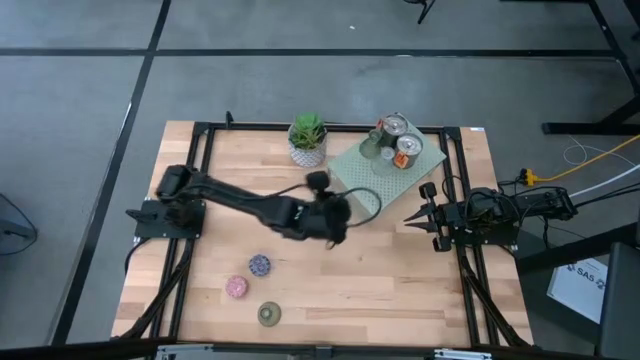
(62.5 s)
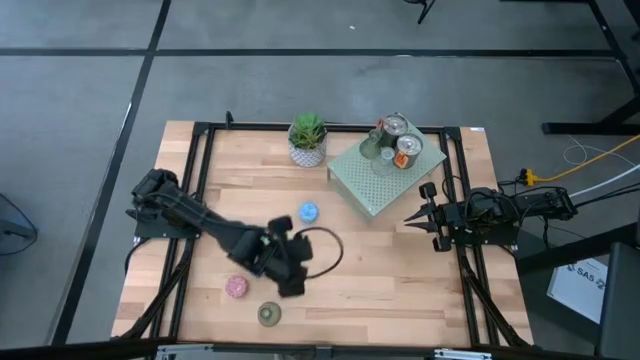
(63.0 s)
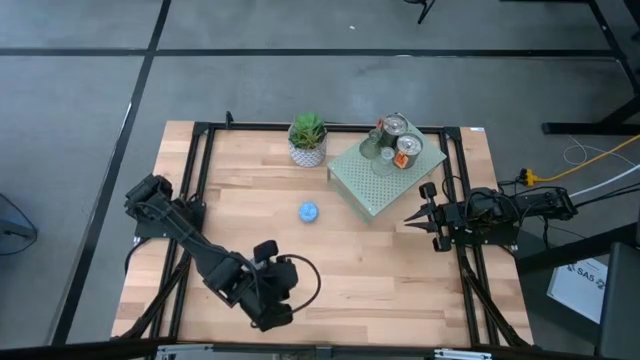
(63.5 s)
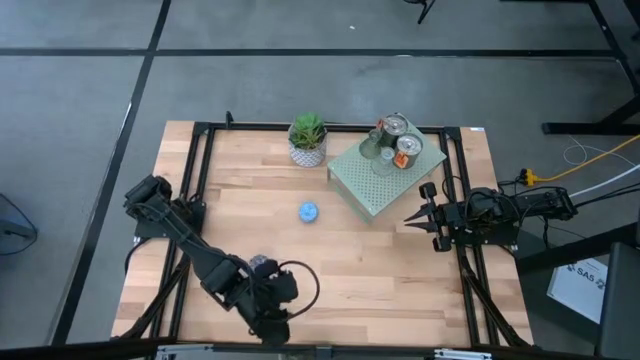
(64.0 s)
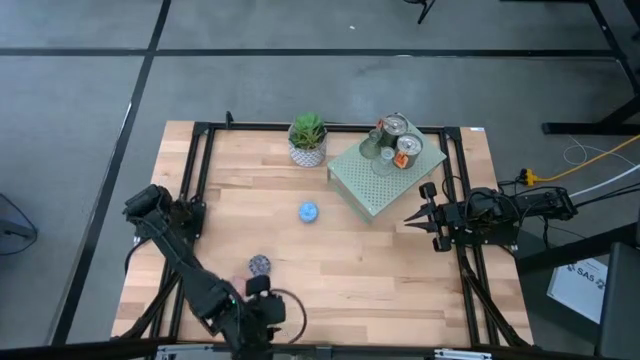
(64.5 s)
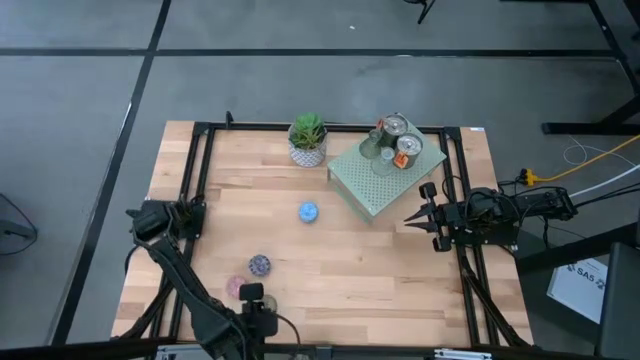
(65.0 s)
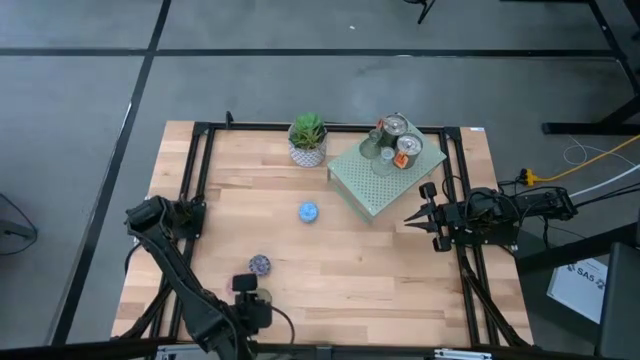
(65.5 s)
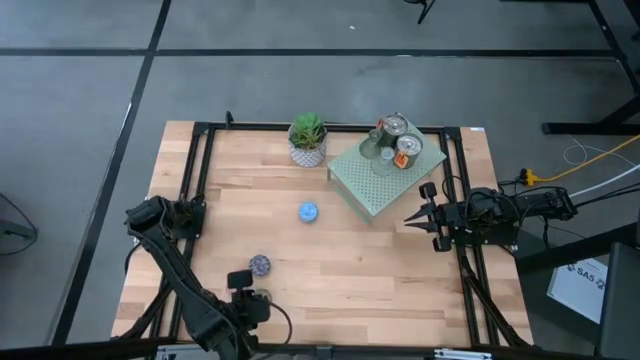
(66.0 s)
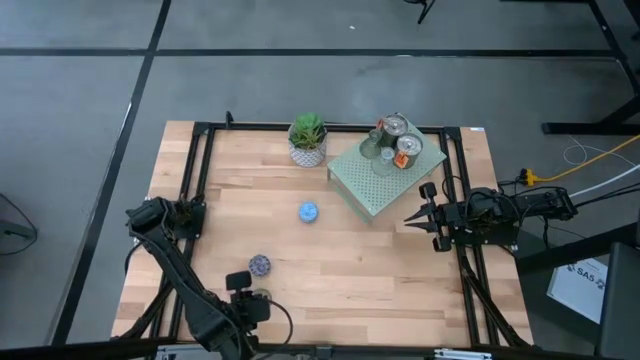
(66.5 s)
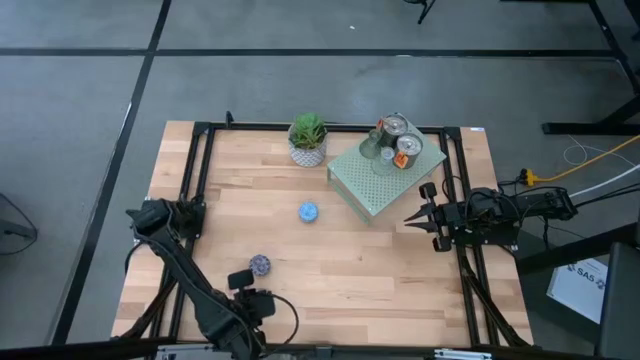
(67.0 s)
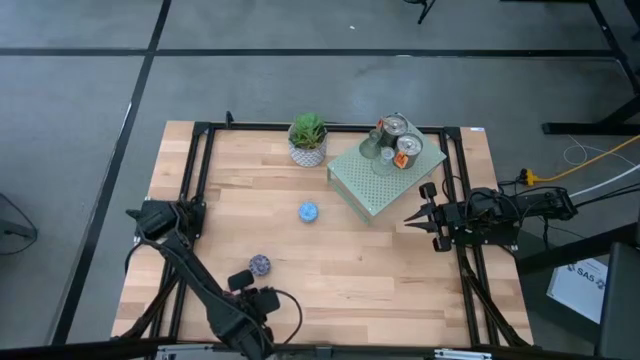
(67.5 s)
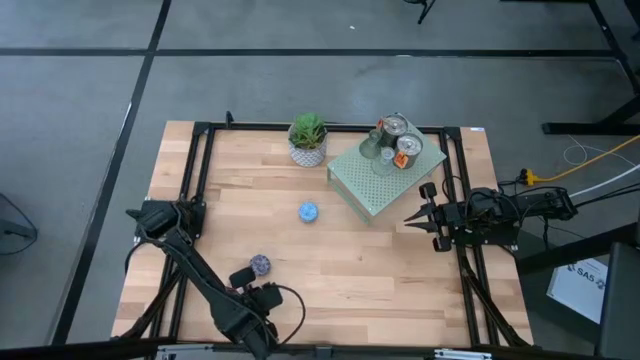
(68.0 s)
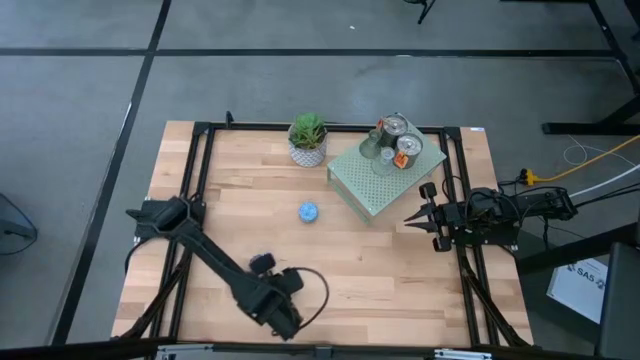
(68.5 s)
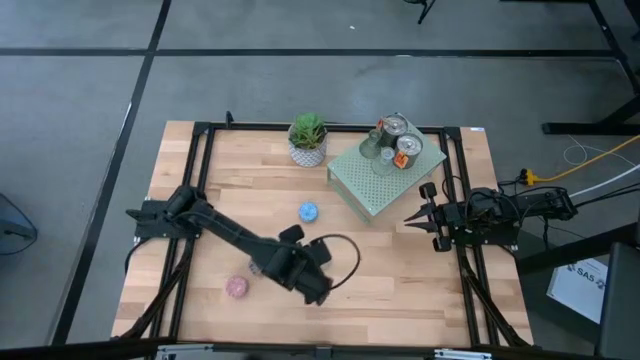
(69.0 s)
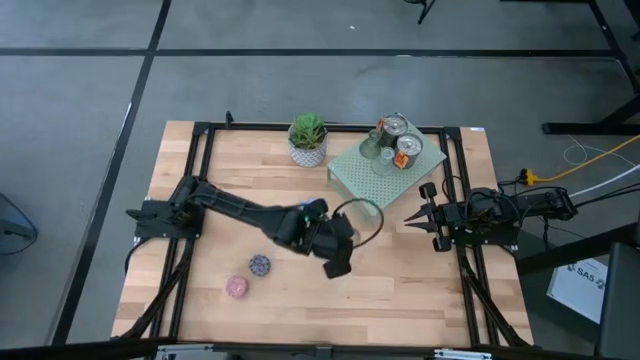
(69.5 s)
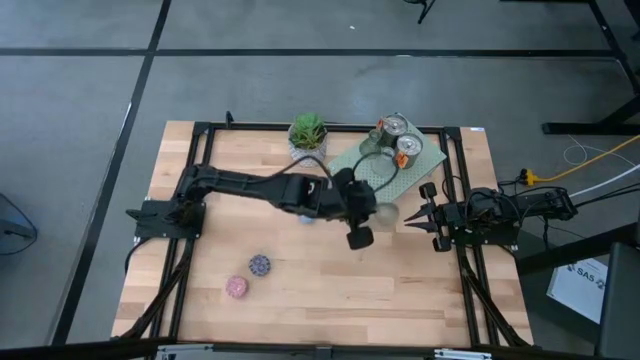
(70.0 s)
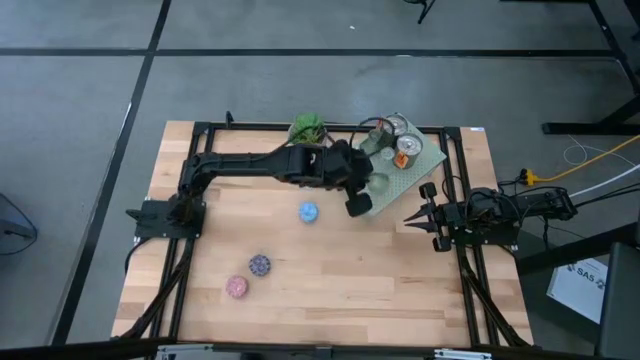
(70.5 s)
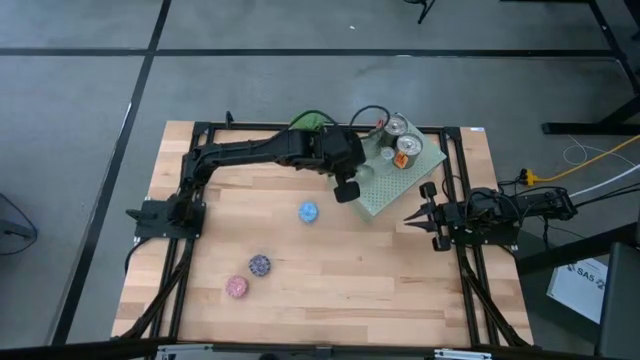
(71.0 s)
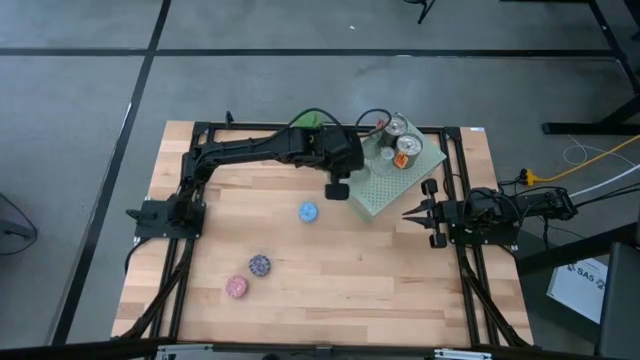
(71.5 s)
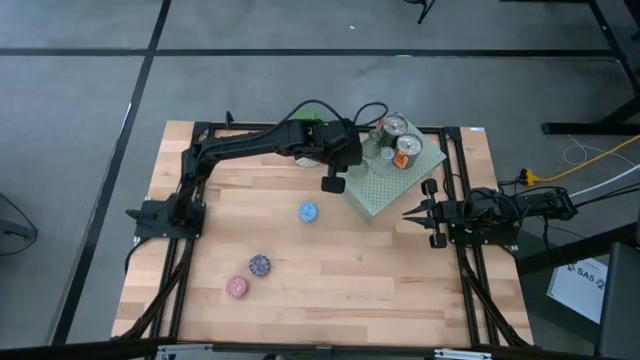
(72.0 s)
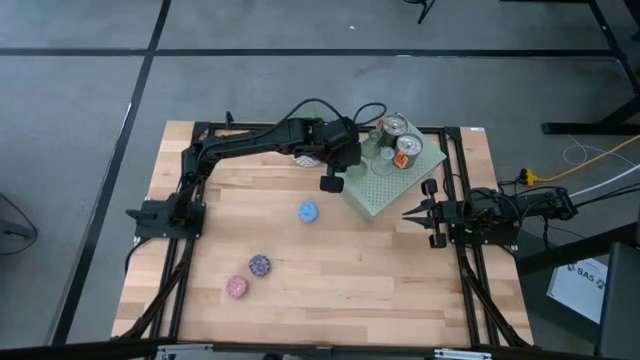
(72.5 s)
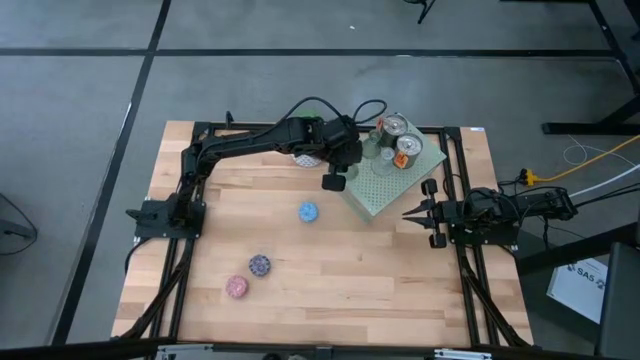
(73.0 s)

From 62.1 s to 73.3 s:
Task: Pick & Place candle stick holders
Align the green glass candle holder with the other transparent glass candle holder on the shelf

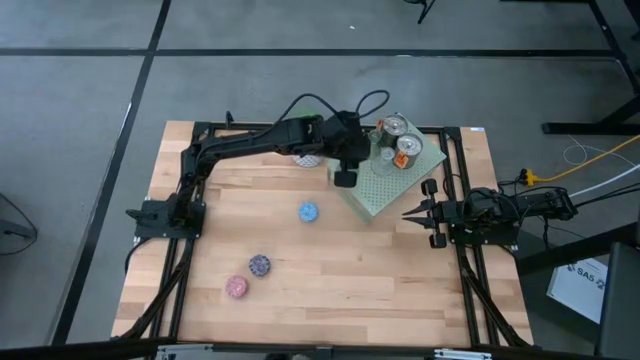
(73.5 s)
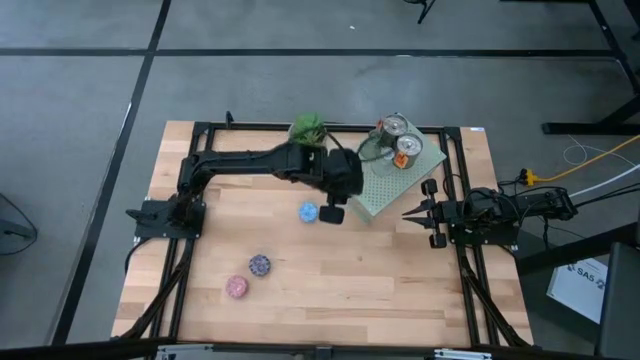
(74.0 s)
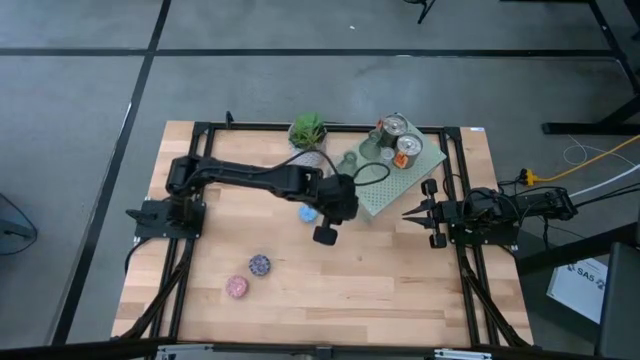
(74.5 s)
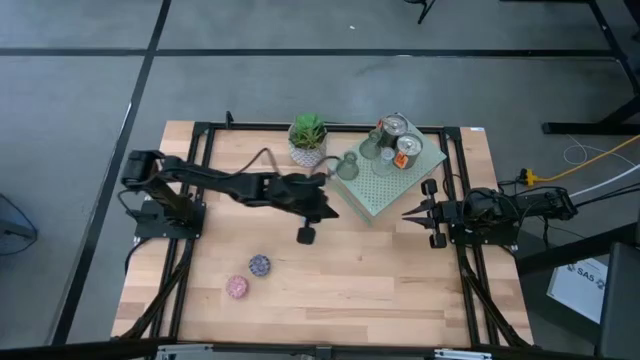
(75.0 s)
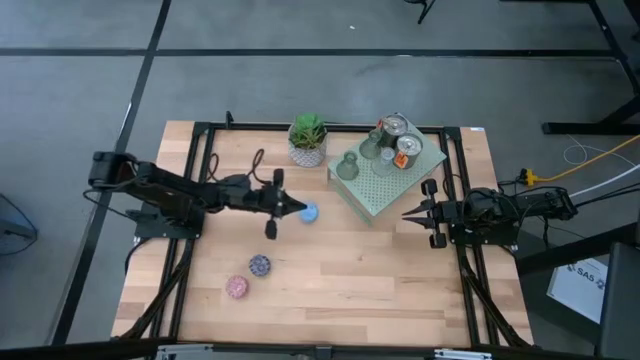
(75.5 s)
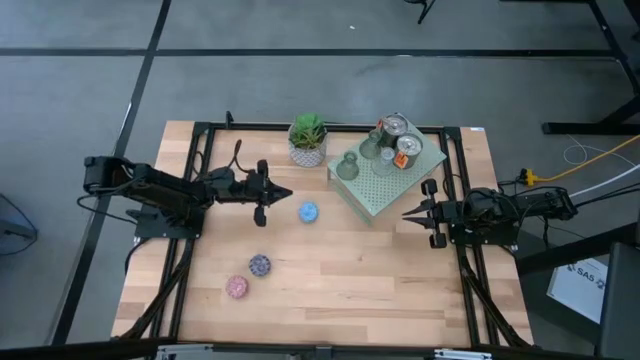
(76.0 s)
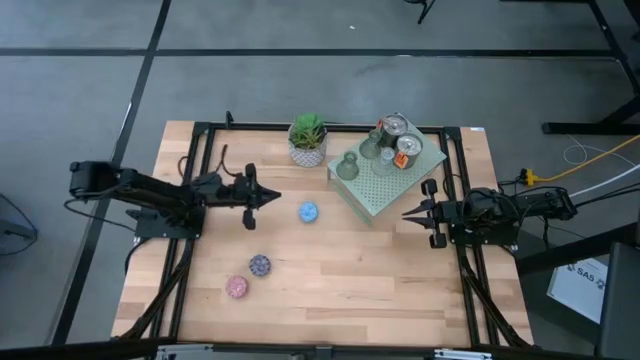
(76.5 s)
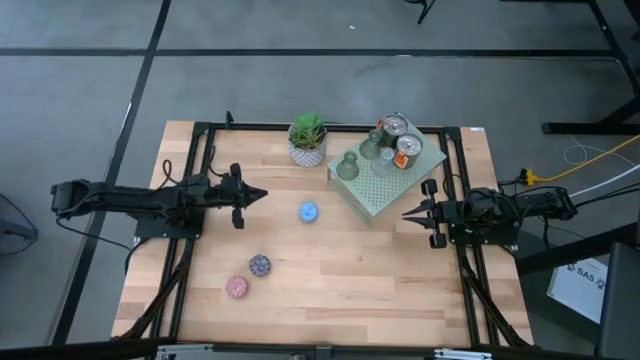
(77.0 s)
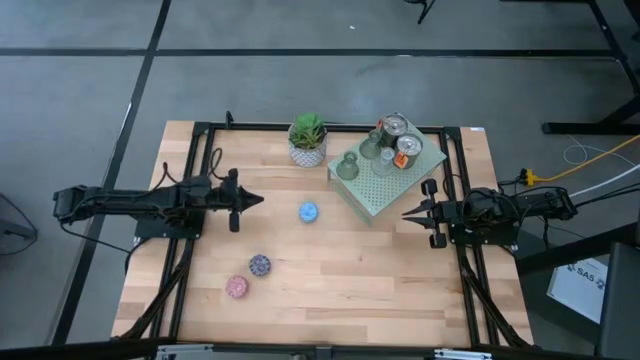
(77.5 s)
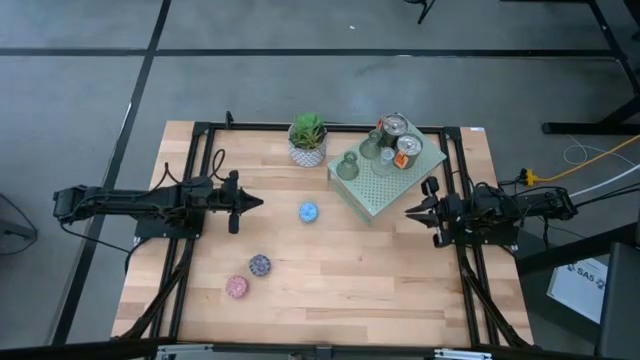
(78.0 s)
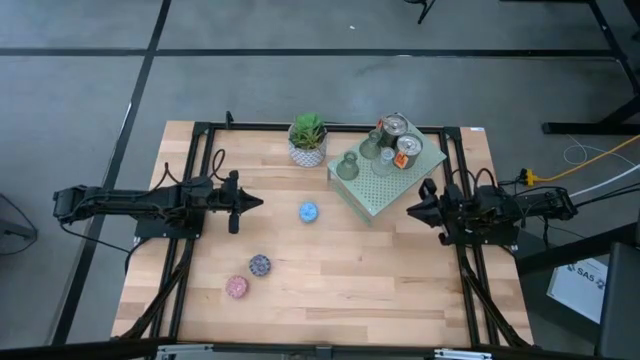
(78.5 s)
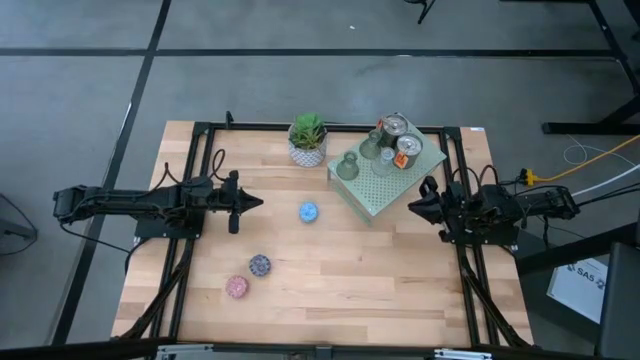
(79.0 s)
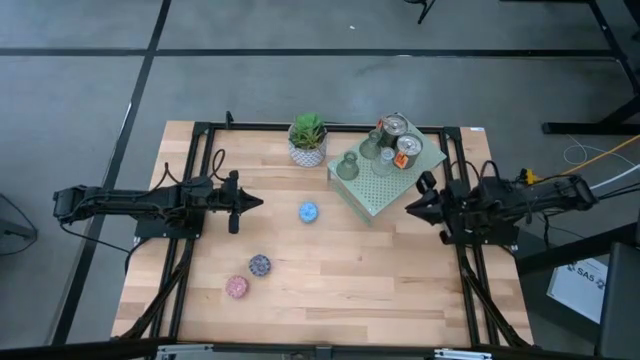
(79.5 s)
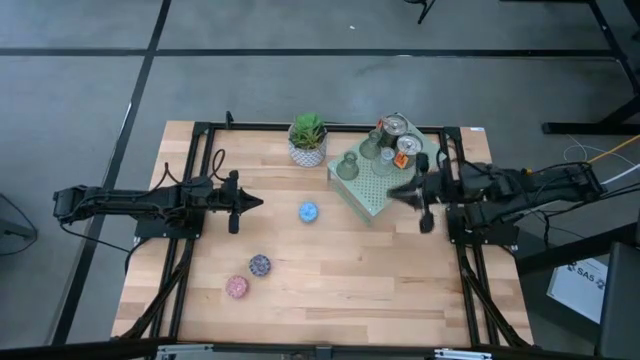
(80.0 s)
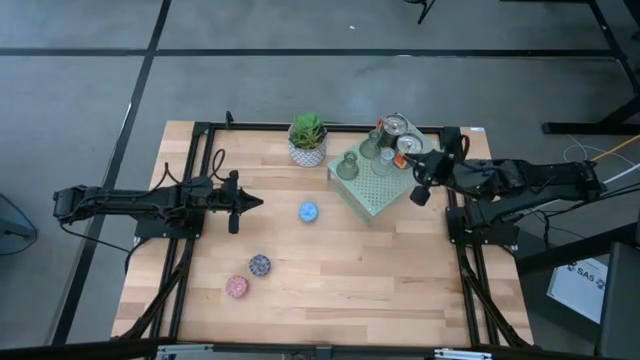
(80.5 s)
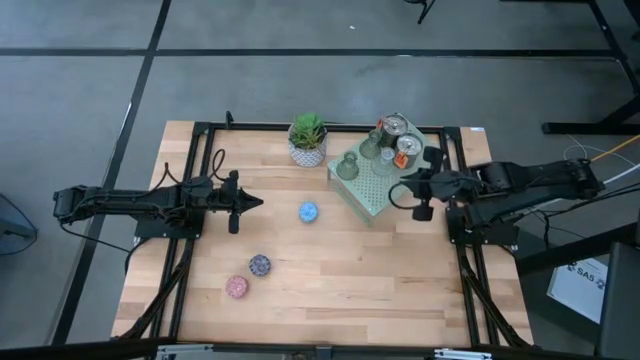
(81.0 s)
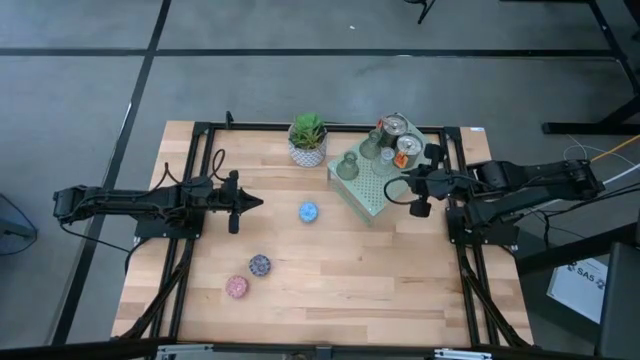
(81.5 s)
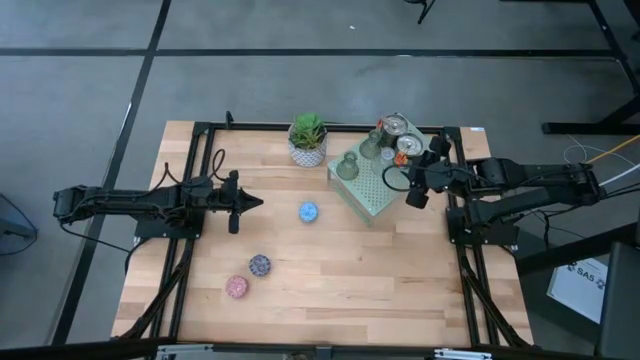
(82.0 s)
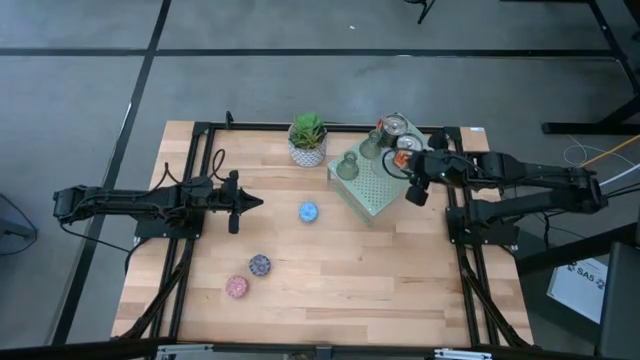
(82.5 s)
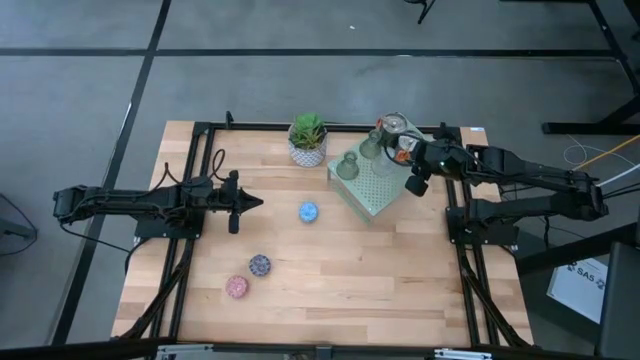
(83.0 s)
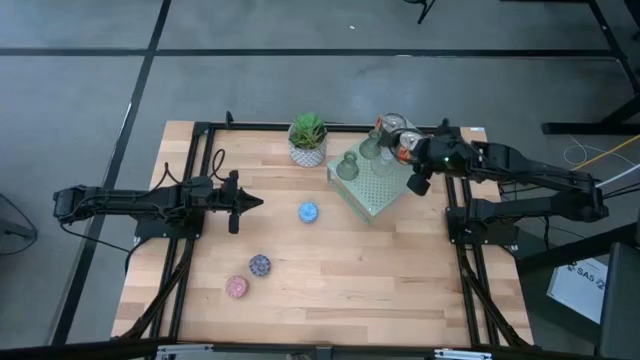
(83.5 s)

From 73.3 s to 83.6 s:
Adjust the silver scented candle on the shelf
